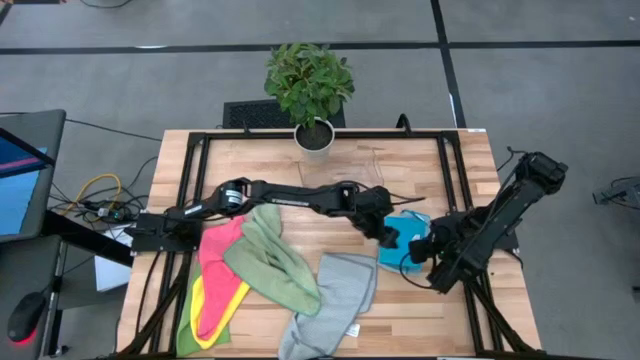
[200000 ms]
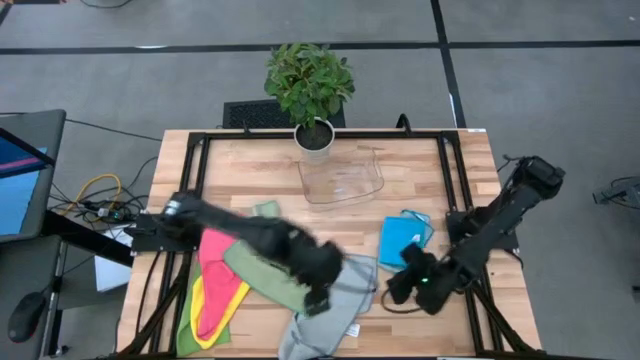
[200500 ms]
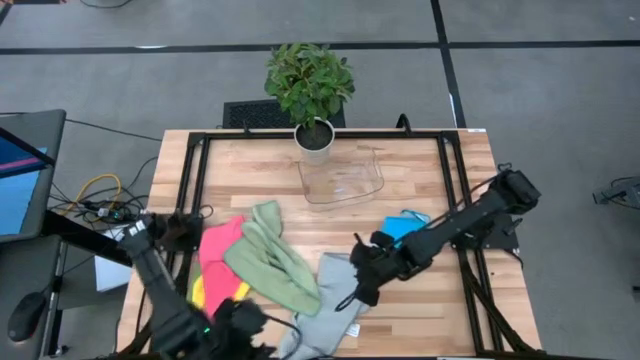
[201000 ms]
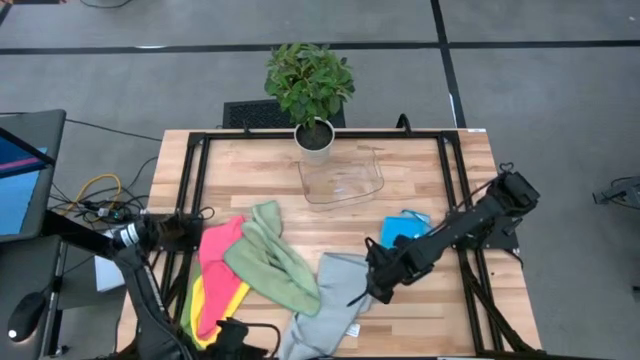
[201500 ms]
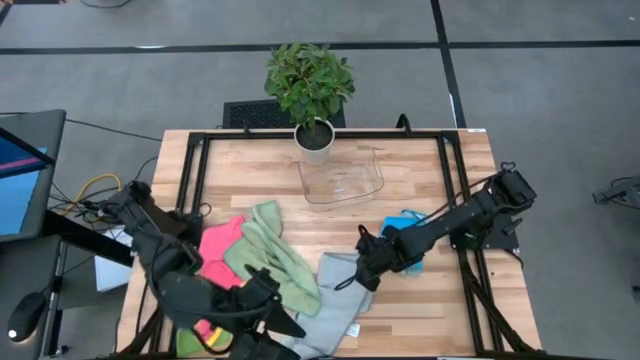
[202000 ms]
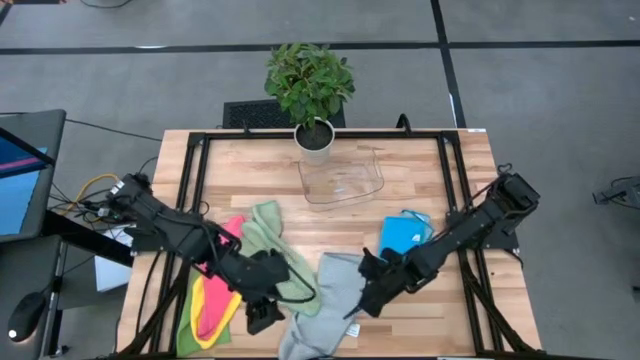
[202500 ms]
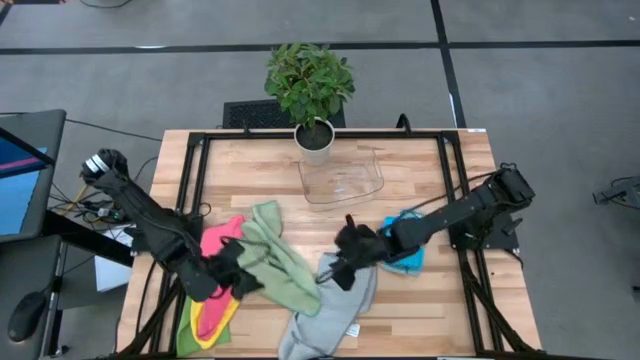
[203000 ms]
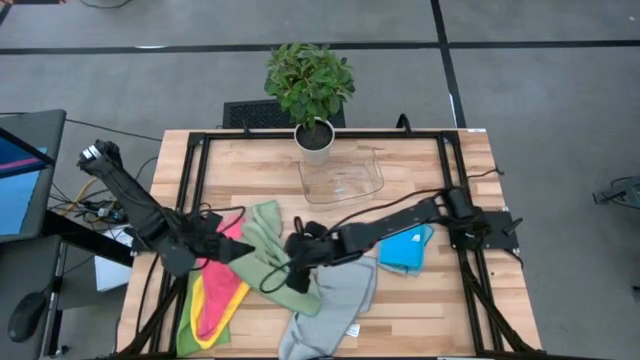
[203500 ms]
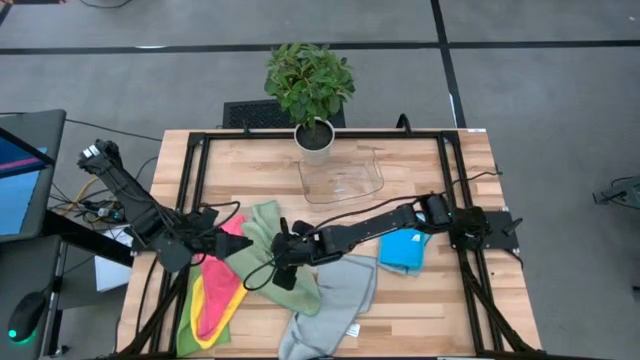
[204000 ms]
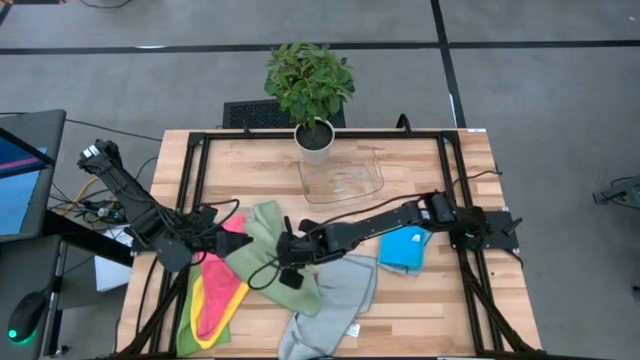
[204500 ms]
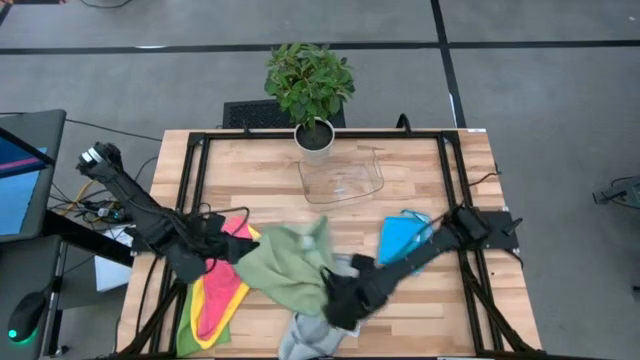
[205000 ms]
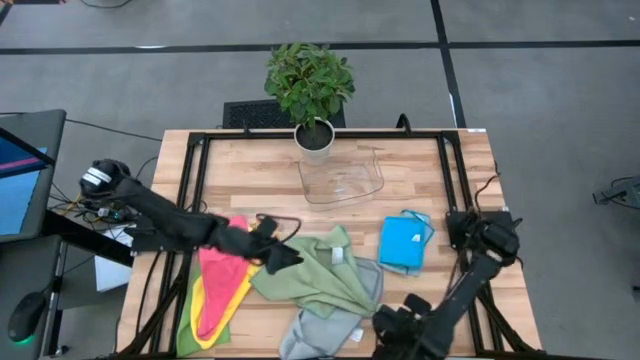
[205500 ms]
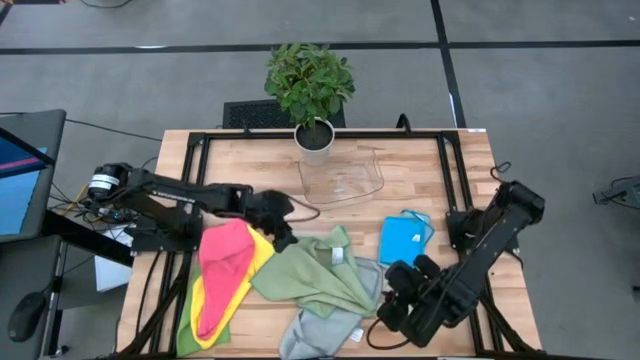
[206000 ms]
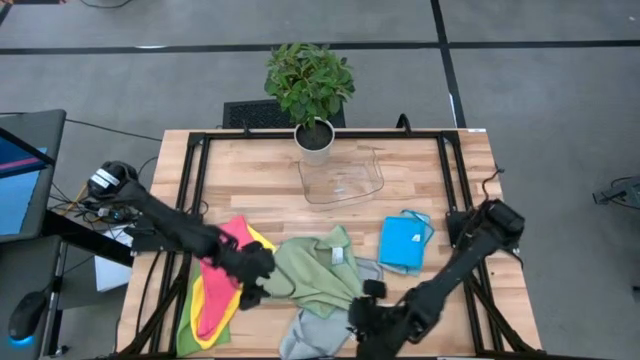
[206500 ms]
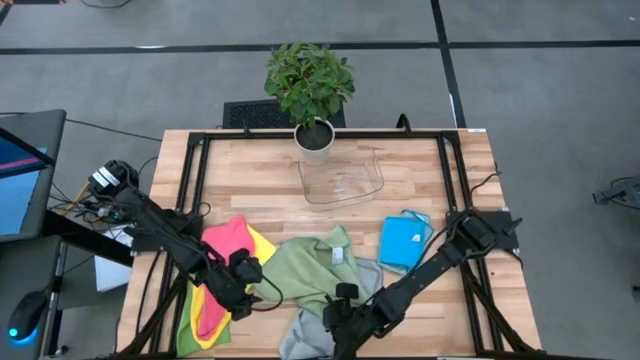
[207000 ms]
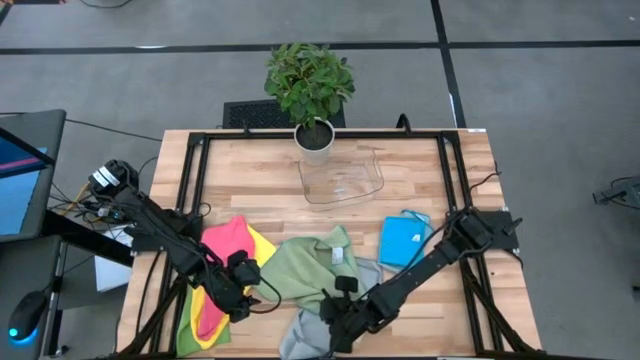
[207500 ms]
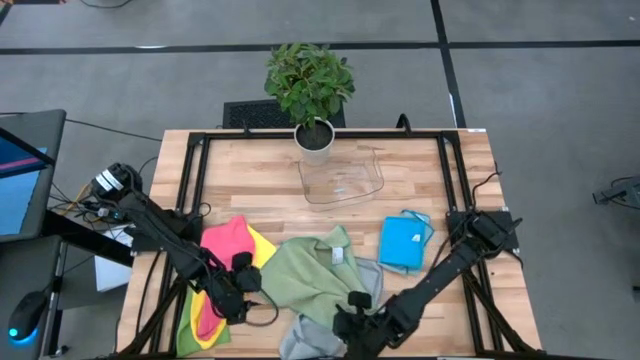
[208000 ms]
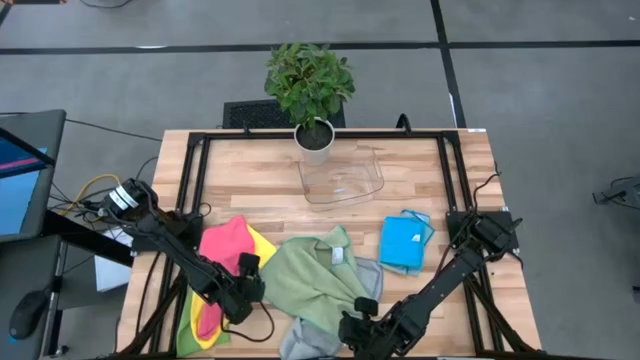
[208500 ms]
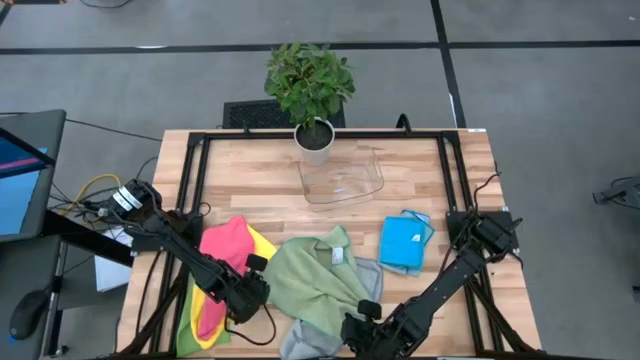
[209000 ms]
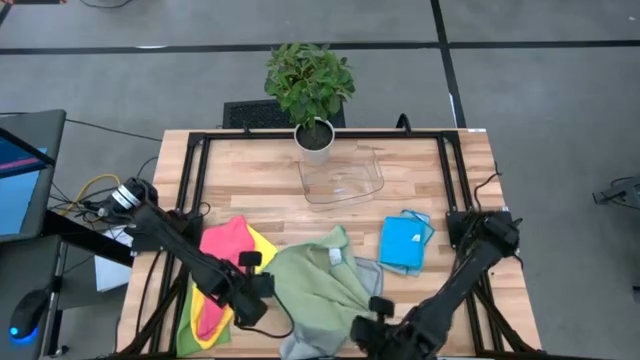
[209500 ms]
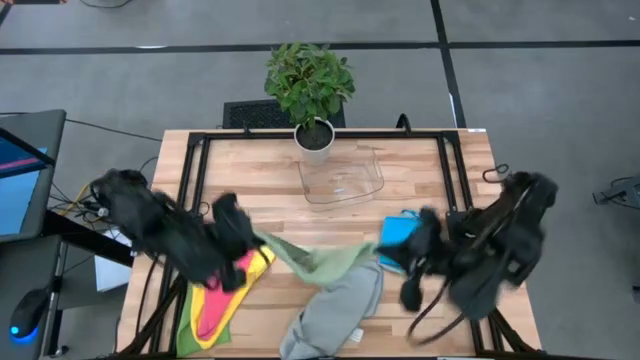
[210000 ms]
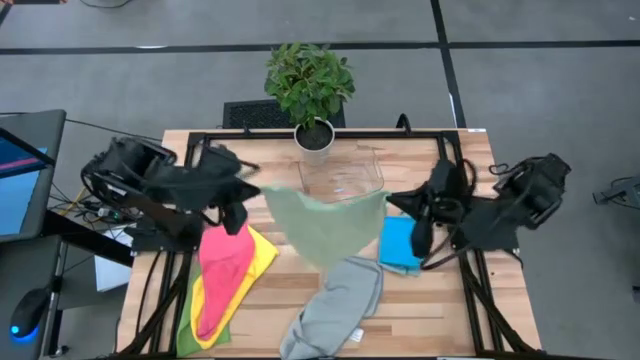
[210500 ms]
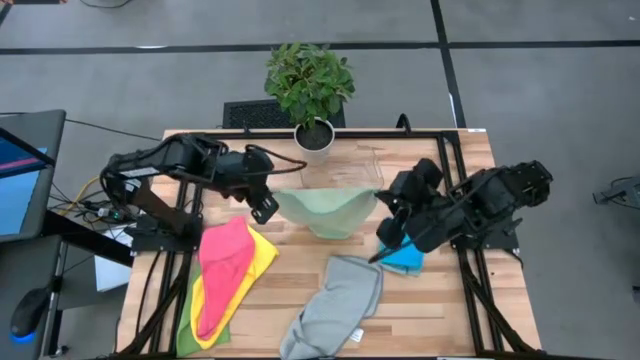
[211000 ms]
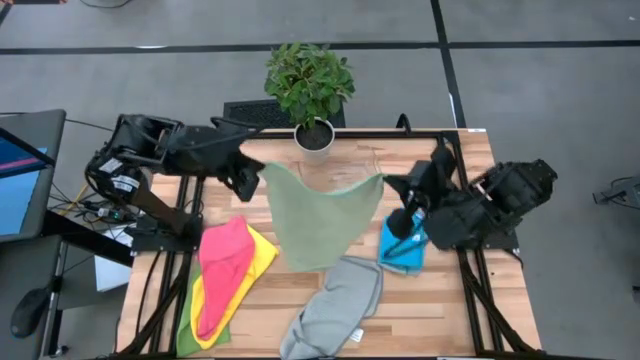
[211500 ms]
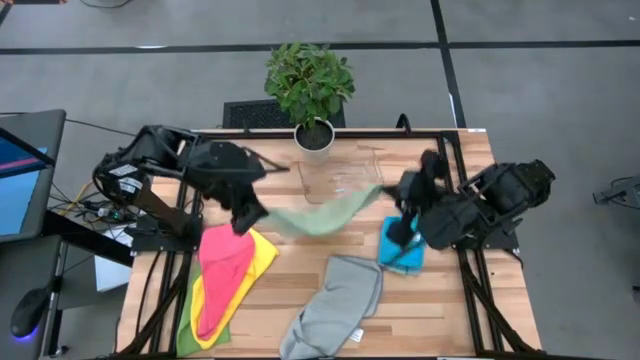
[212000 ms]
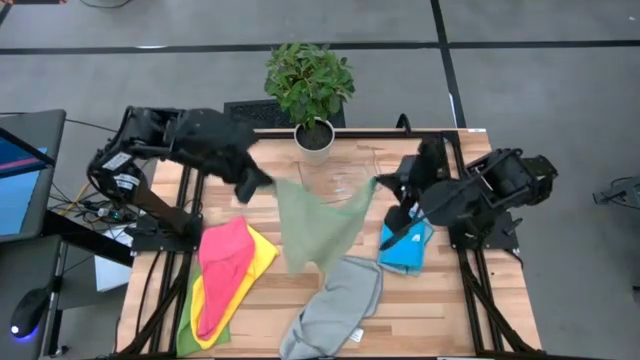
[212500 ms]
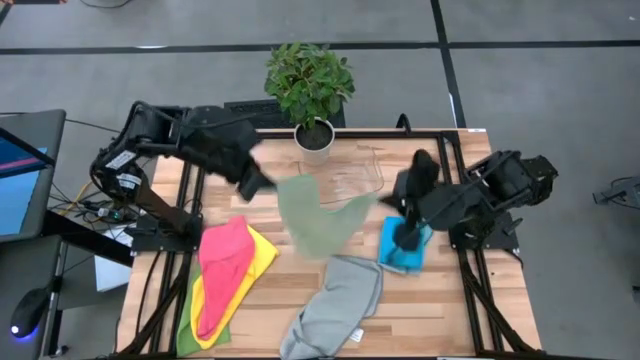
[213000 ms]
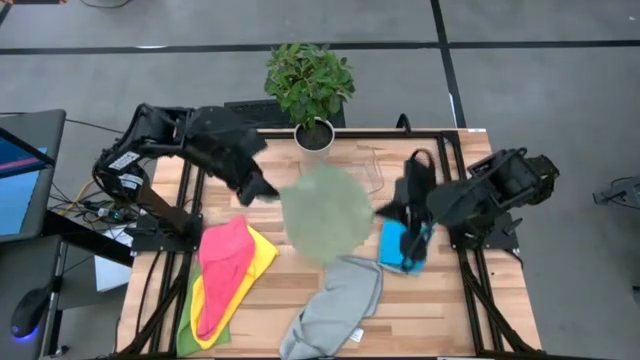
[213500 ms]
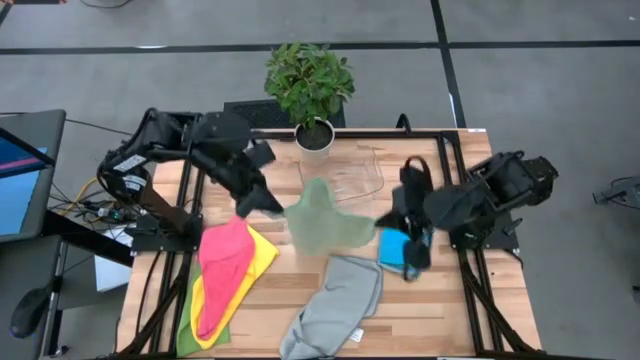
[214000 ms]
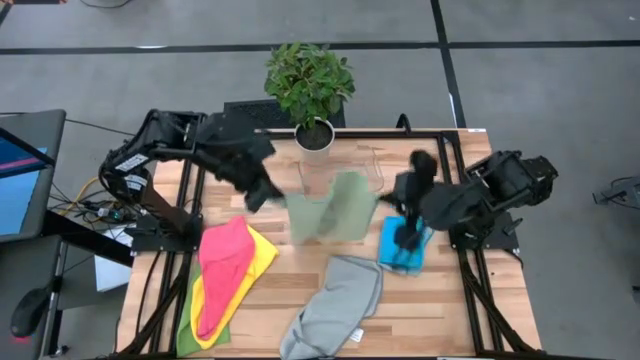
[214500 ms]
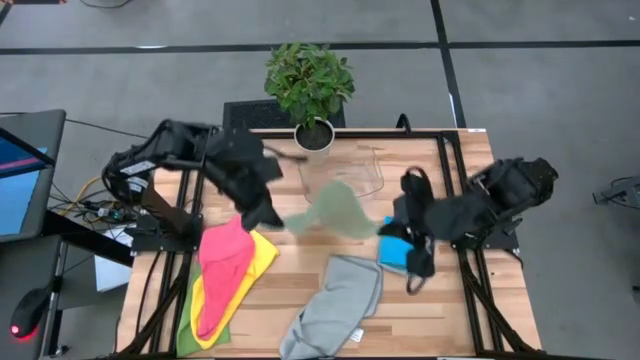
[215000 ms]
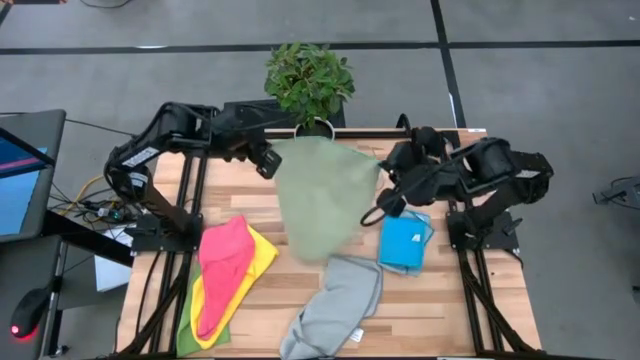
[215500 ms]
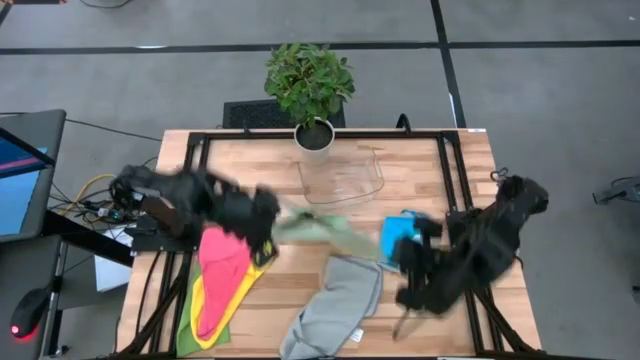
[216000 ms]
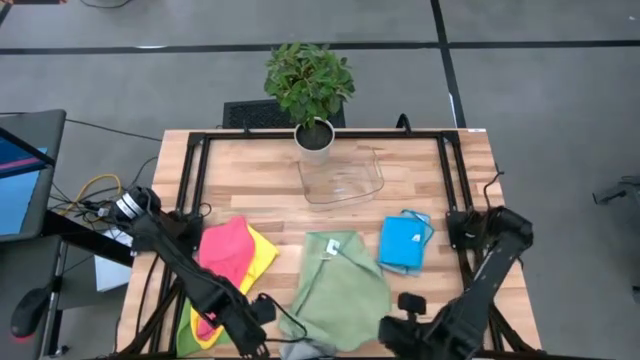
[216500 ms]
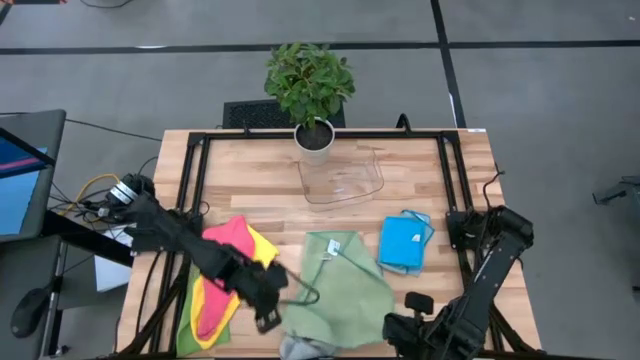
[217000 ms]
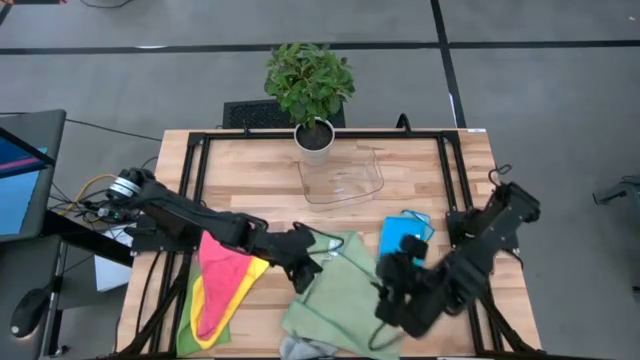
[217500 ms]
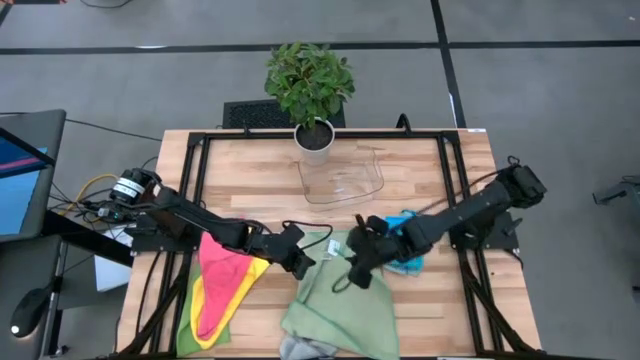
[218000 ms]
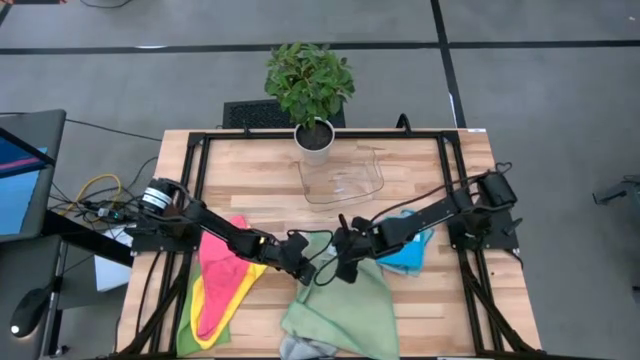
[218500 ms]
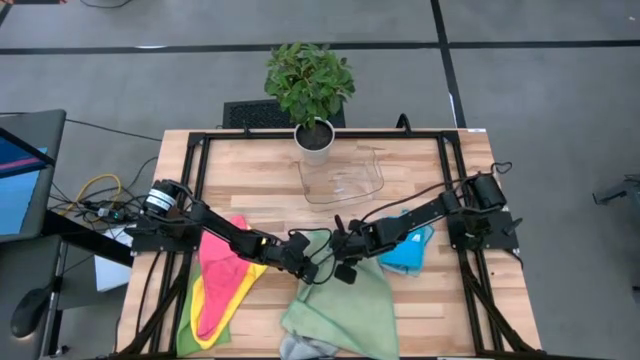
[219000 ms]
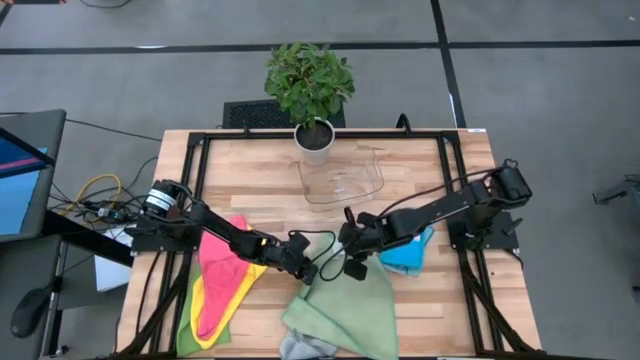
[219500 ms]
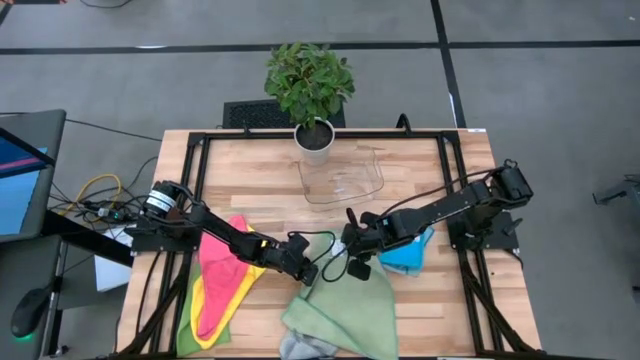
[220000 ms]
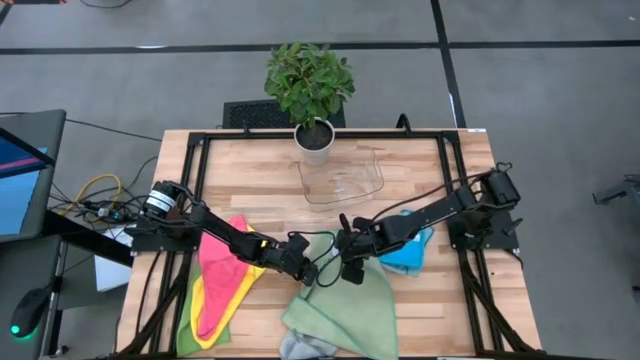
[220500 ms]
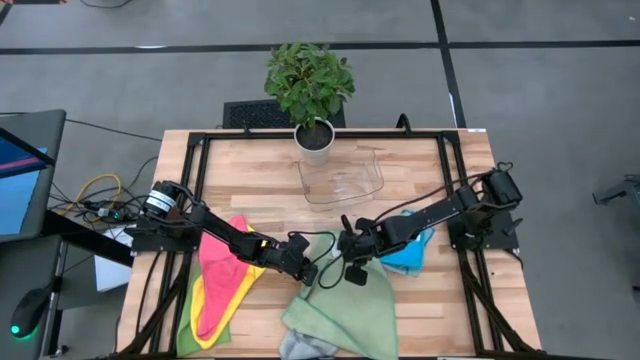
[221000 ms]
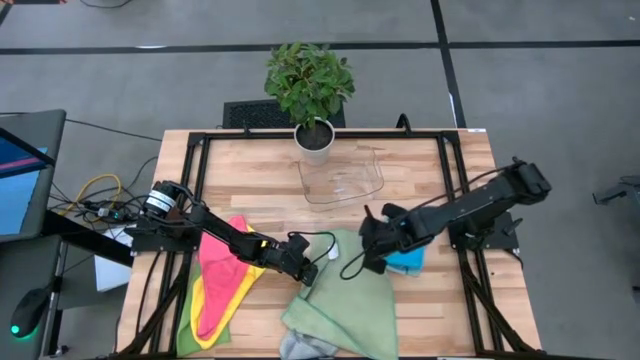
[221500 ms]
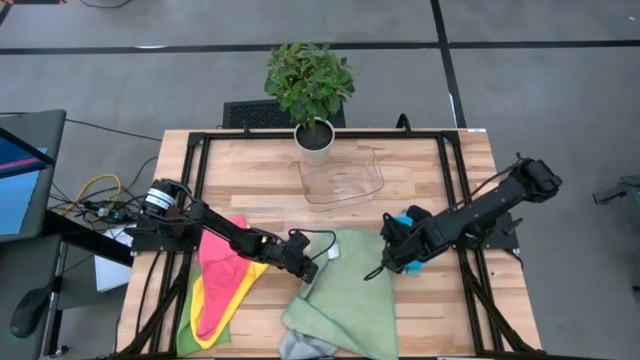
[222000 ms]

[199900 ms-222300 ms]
Task: Fold microfiber towels
Fold the light green microfiber cloth
